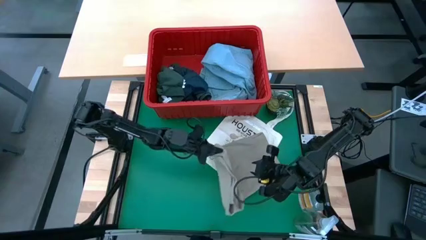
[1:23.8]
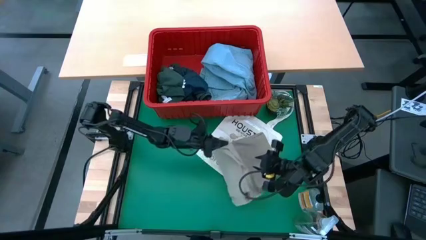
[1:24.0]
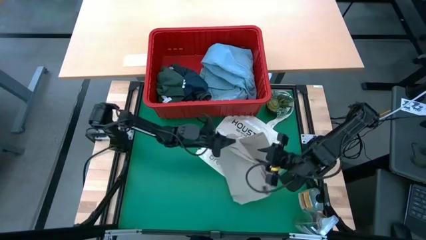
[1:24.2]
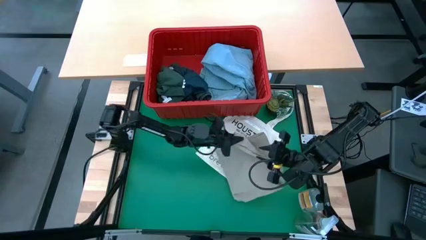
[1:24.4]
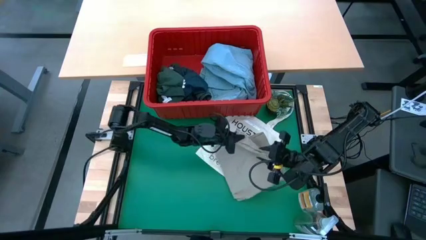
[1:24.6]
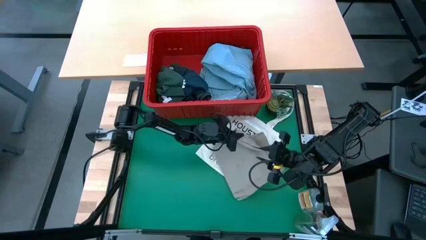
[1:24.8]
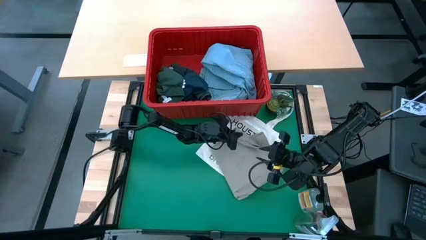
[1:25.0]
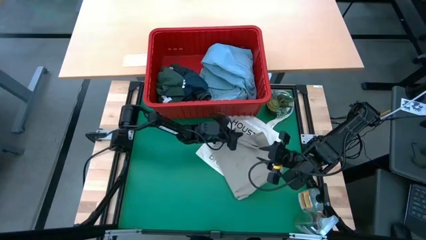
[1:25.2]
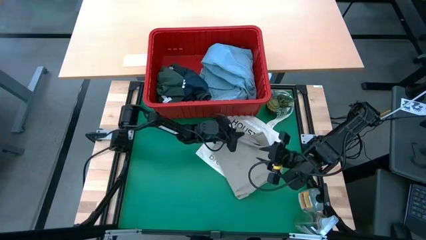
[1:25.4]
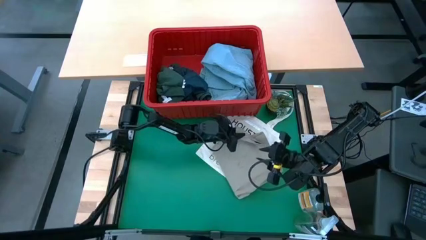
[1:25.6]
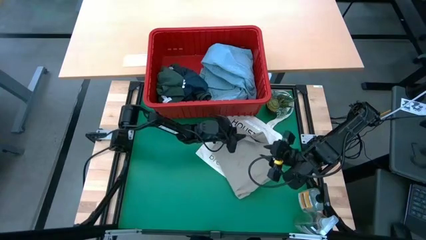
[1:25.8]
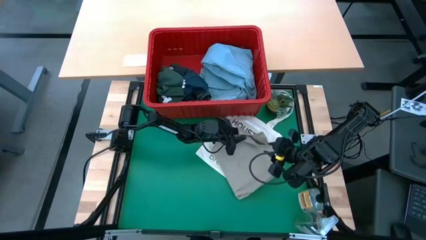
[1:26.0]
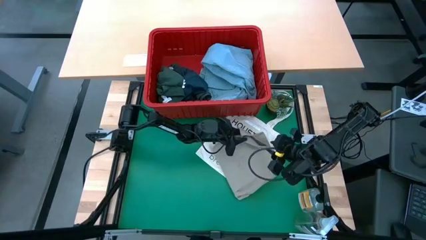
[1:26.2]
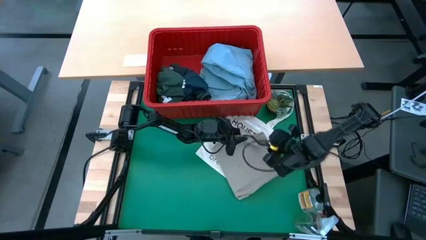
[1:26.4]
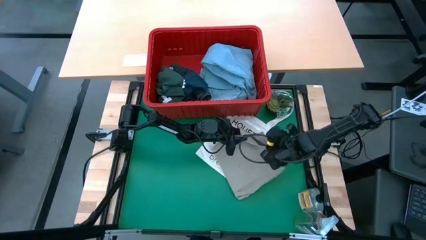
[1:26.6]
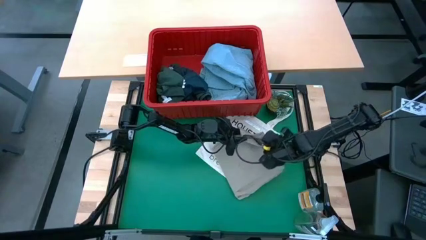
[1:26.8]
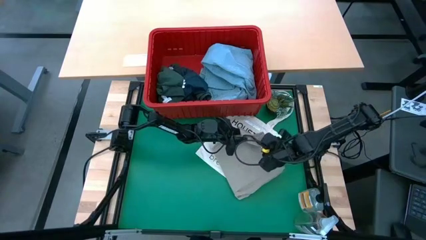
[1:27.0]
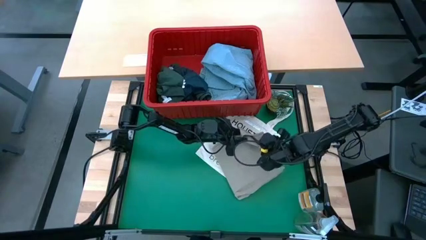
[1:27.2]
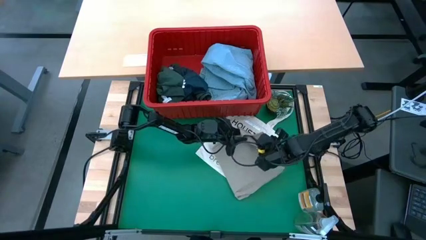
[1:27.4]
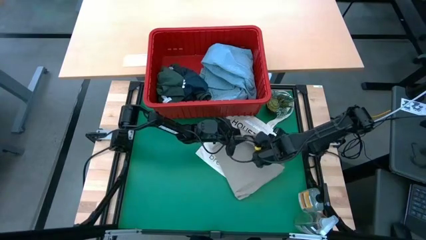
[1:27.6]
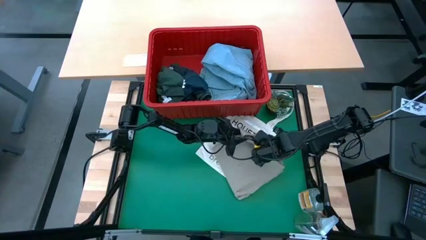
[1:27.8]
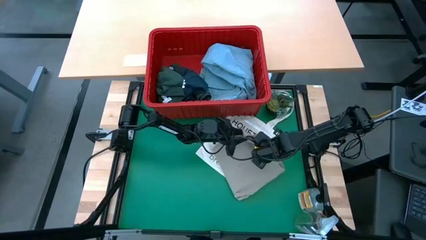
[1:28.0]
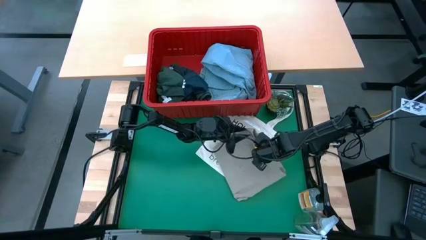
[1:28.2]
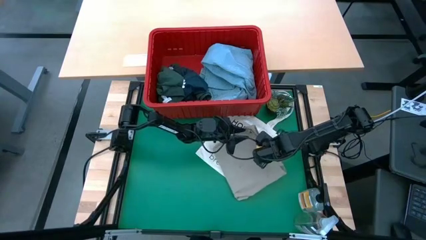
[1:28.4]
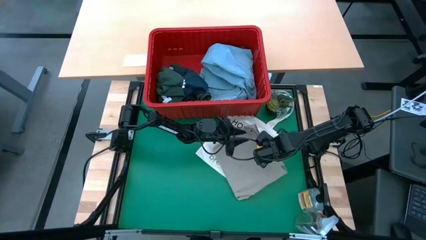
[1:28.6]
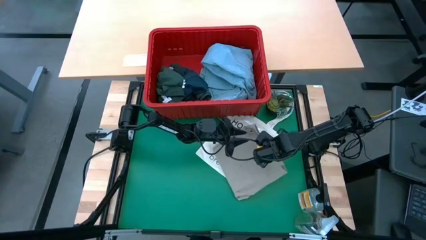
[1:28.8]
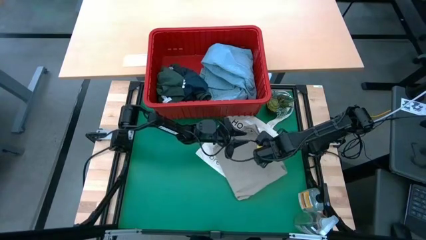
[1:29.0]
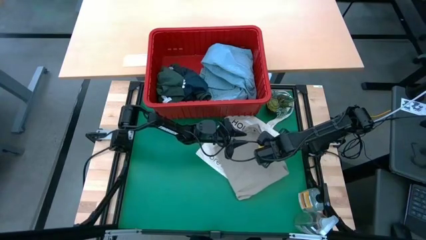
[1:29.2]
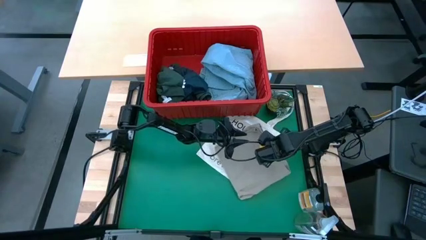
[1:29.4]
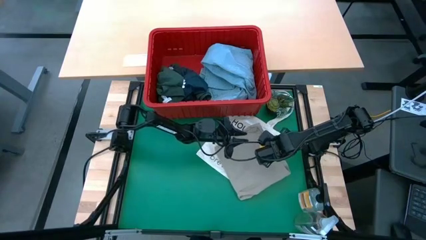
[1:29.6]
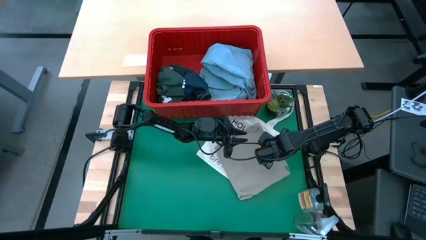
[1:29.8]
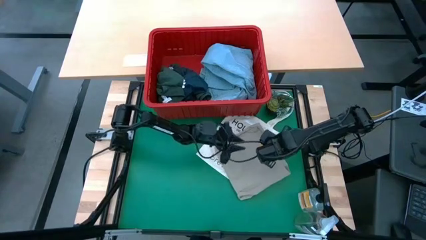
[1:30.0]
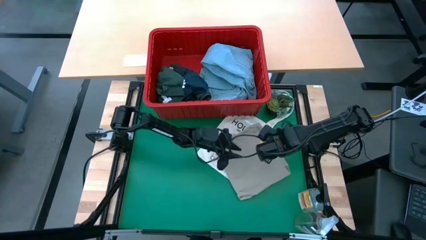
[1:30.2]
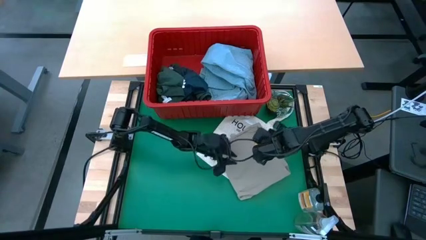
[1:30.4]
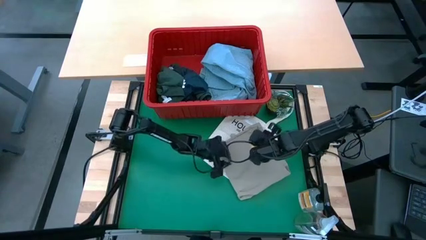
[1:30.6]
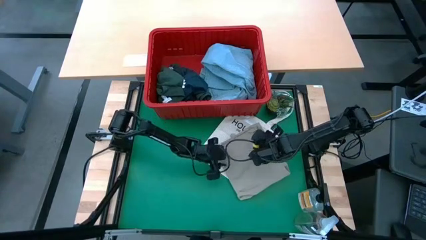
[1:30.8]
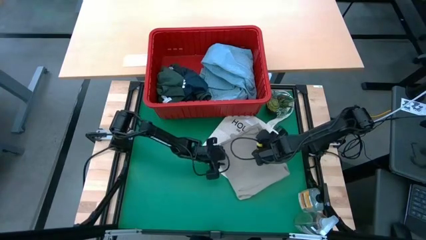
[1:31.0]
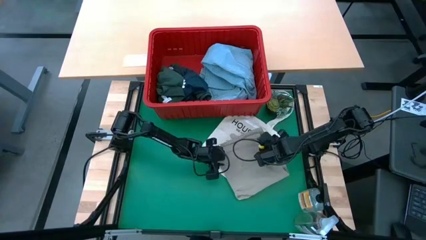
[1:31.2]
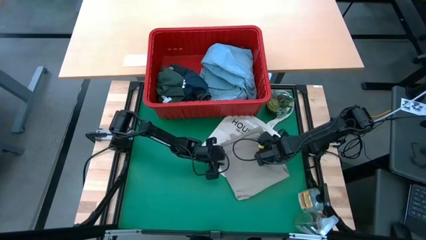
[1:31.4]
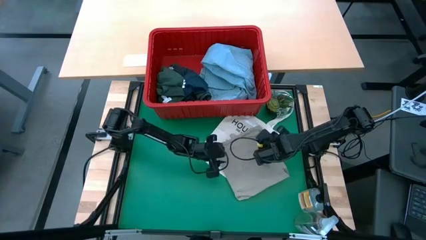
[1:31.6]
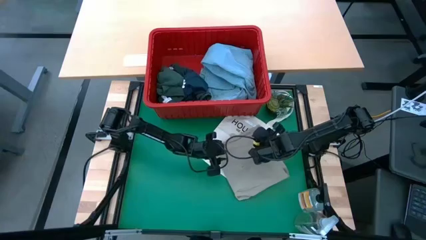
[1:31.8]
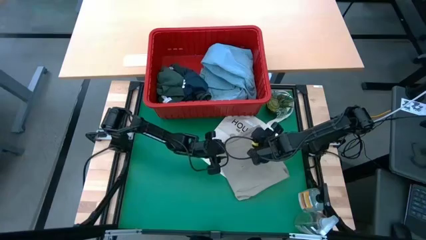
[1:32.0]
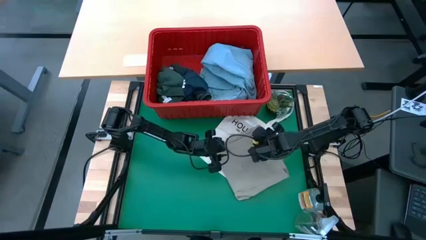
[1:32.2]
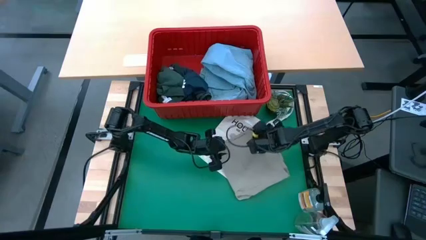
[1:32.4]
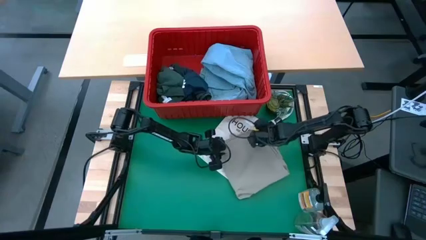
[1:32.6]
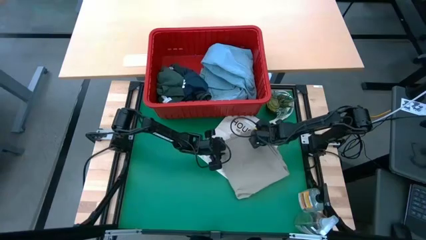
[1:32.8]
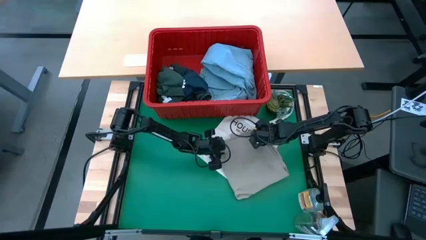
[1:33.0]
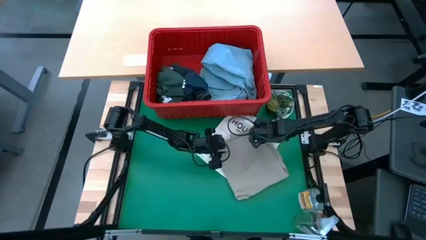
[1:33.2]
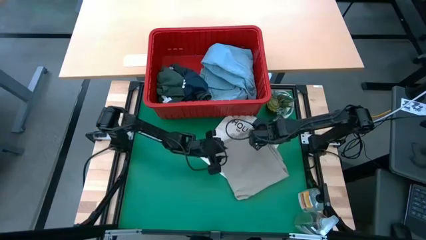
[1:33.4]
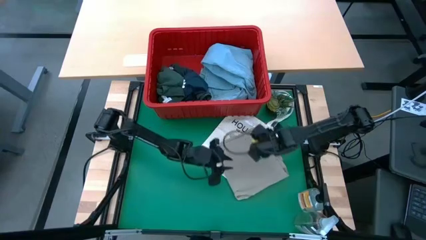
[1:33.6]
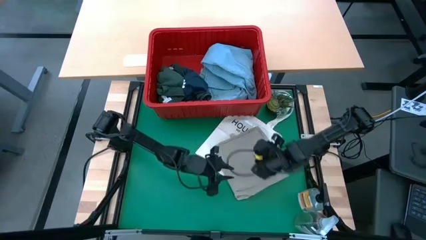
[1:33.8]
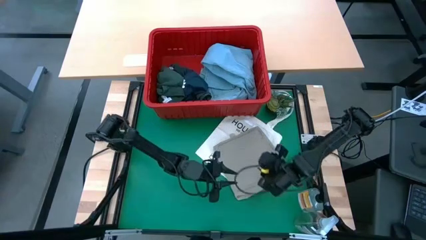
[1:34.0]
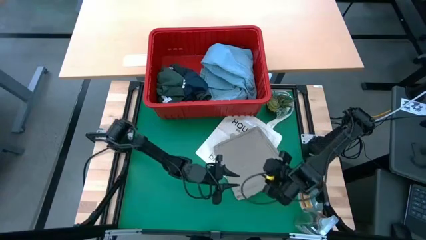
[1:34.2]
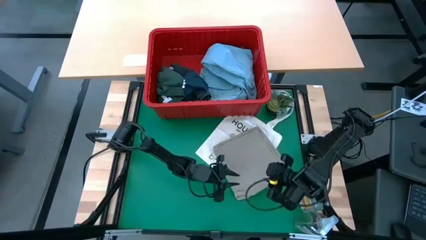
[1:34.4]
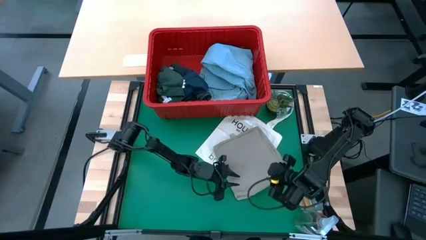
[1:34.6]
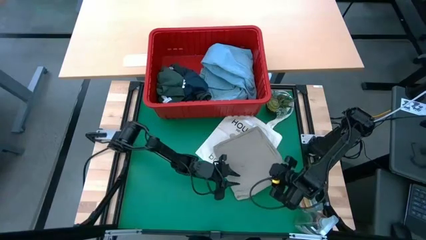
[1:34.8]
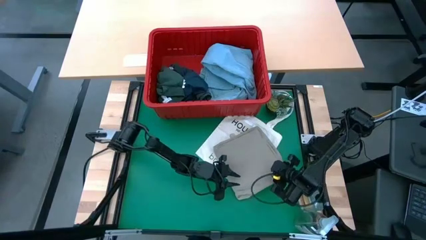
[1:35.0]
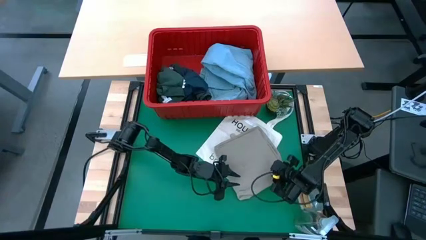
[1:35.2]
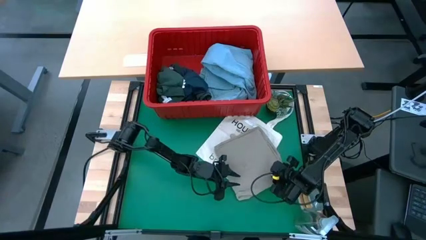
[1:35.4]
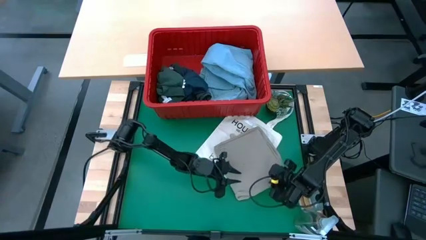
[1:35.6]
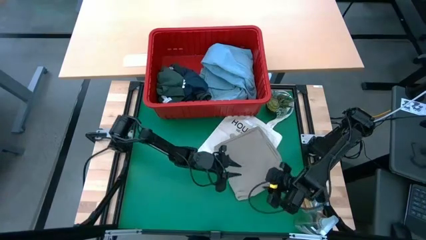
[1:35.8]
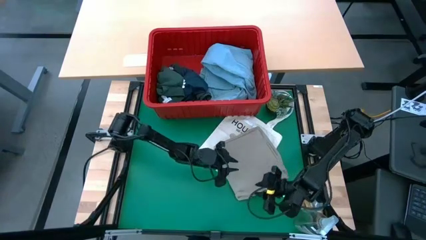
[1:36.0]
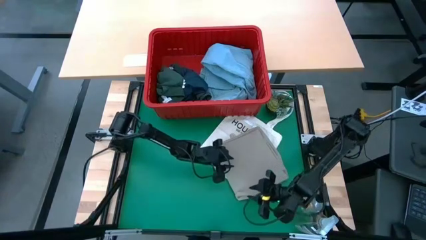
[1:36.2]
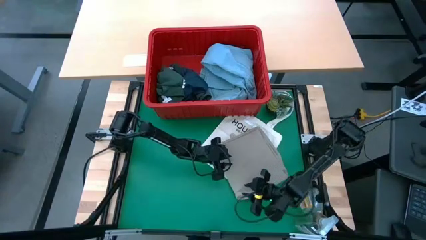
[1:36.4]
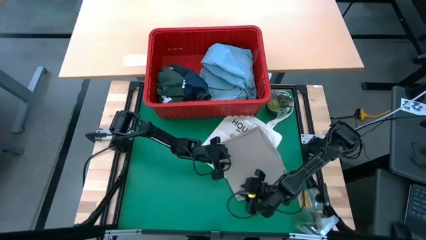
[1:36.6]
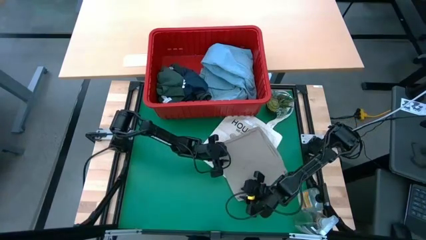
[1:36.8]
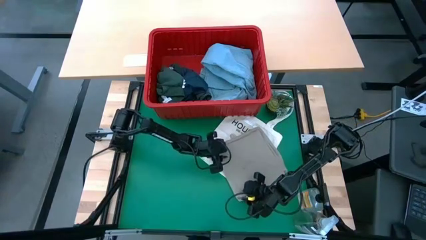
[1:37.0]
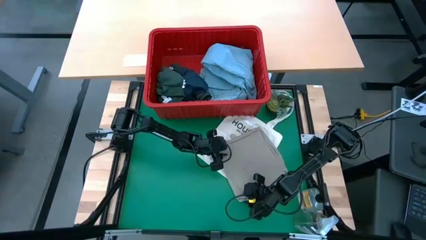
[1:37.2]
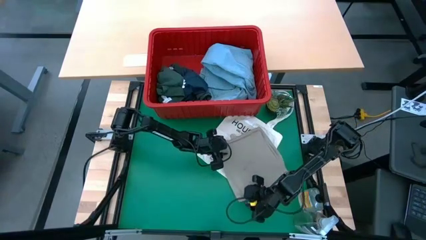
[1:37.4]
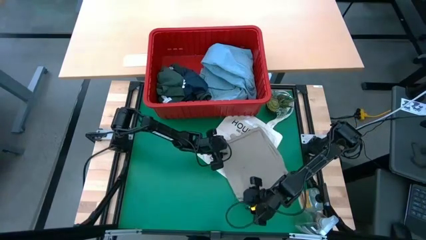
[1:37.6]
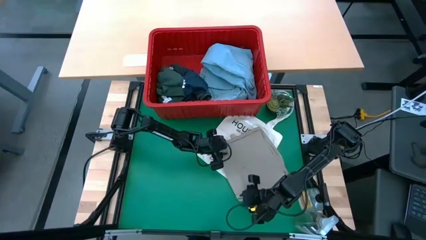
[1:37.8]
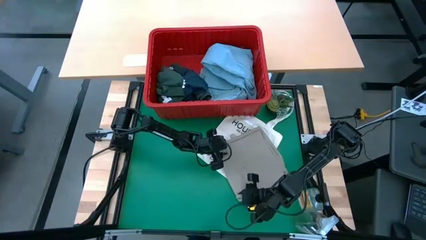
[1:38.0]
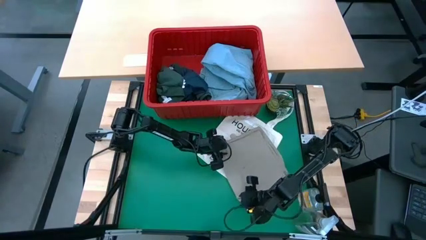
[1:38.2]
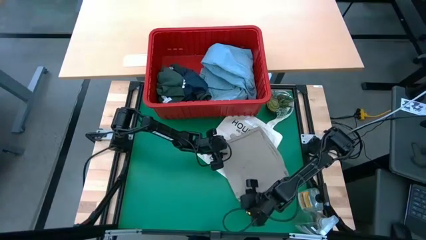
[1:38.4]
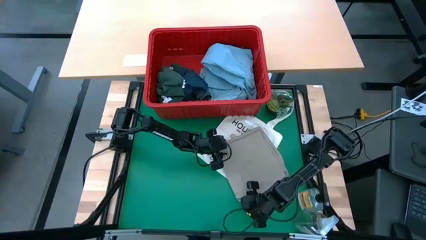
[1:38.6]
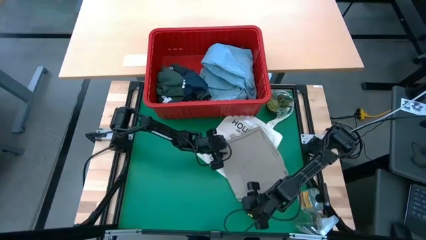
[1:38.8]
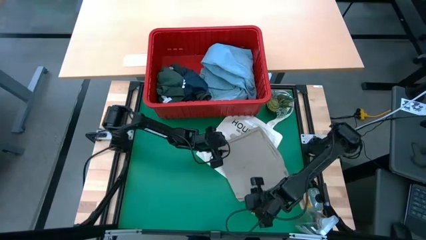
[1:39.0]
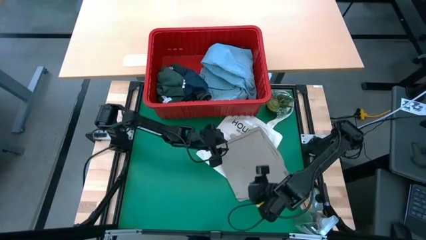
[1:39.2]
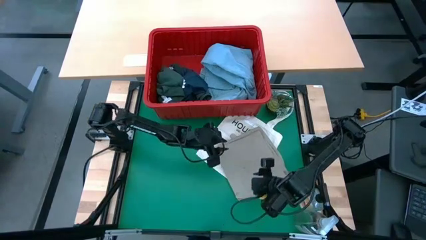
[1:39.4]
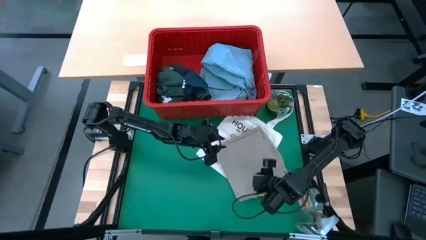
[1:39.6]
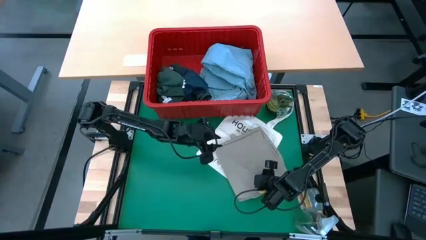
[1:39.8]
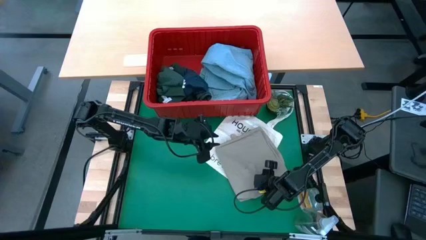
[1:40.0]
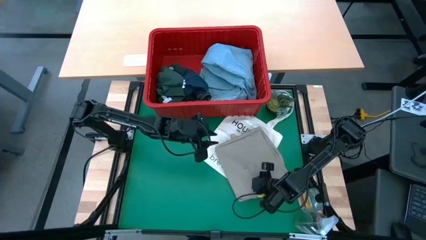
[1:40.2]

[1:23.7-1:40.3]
Task: Fold Laundry from Bin
Fold the brown shorts
